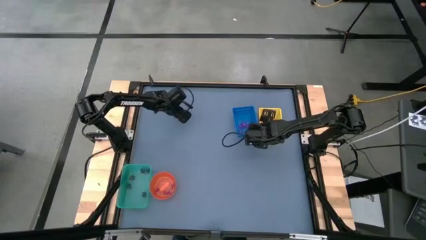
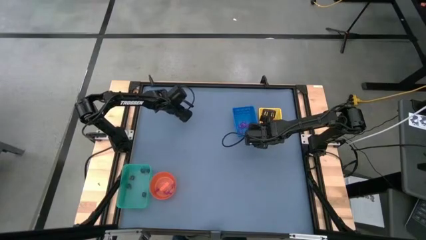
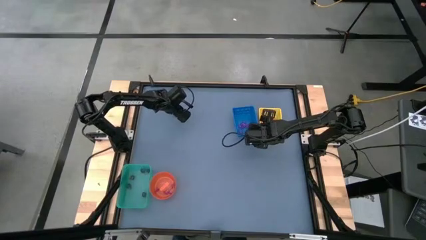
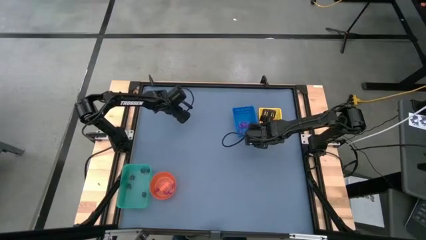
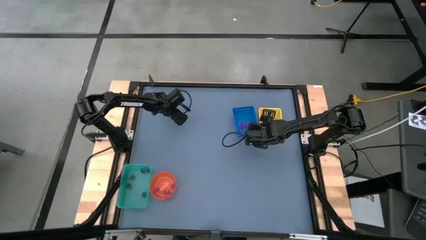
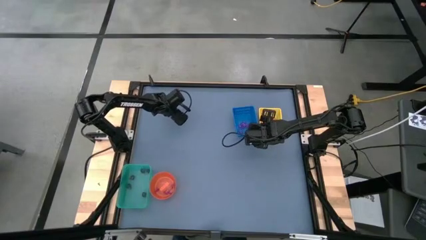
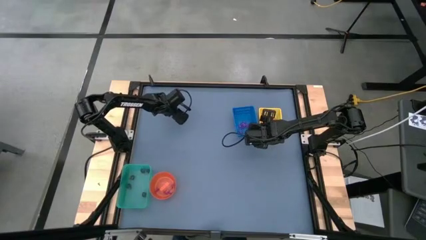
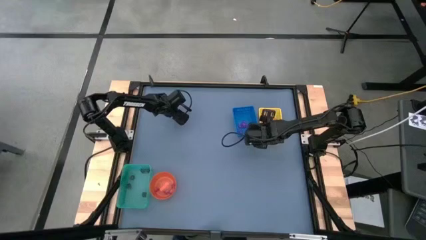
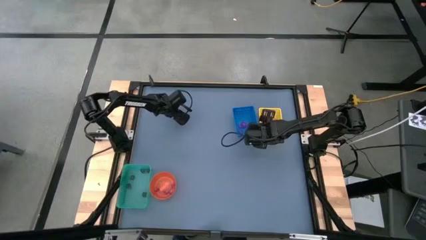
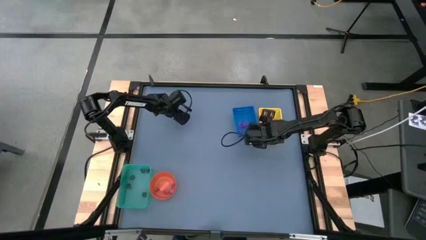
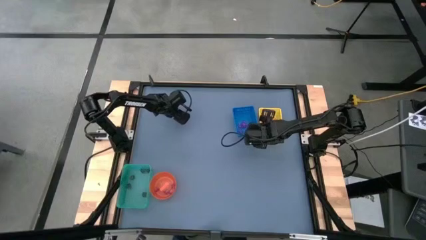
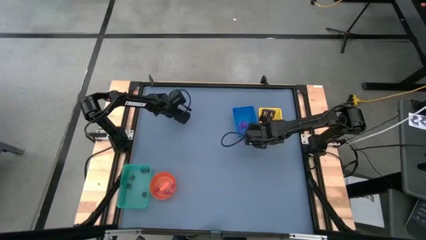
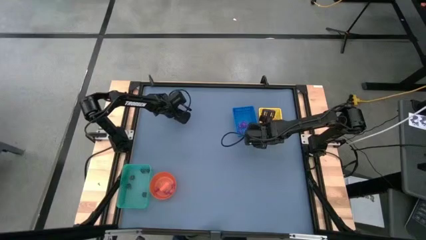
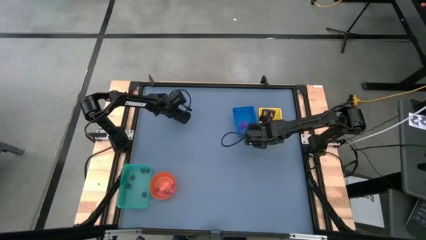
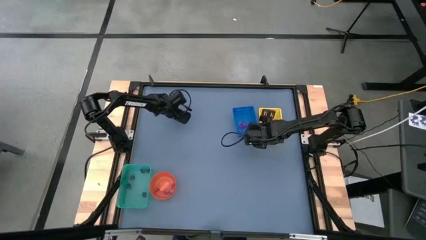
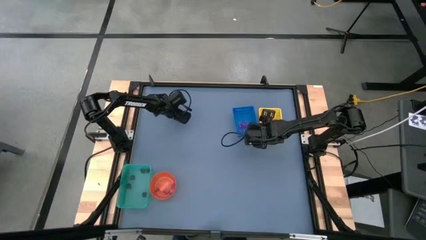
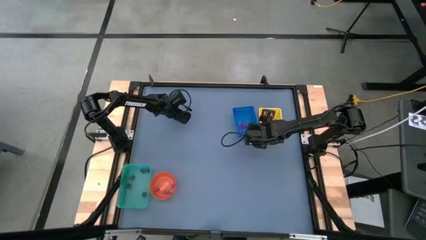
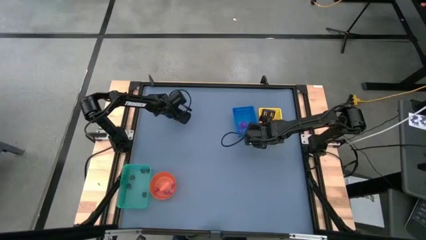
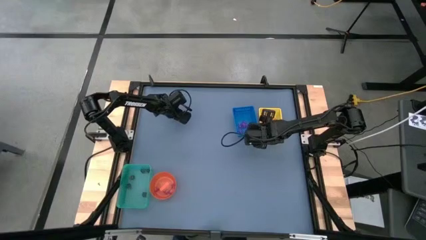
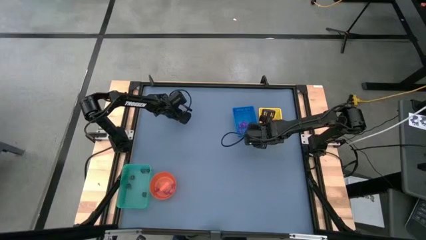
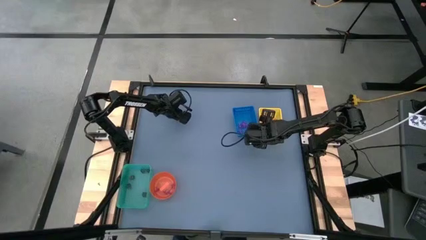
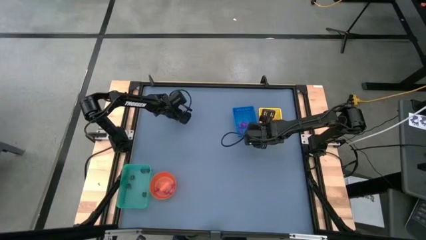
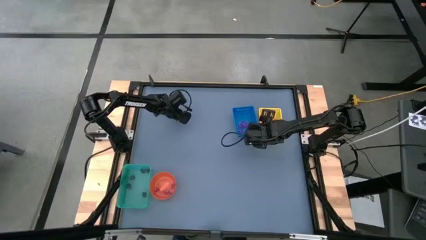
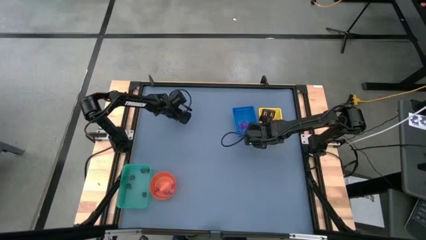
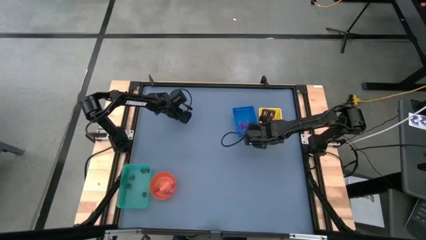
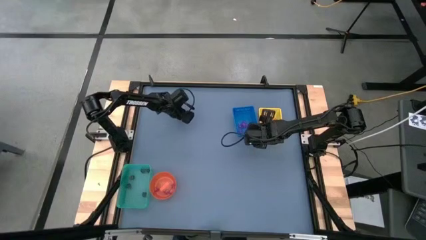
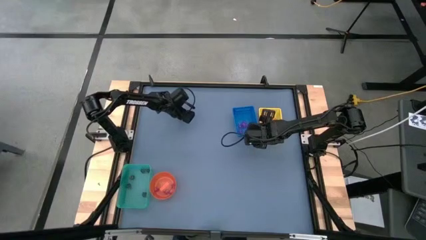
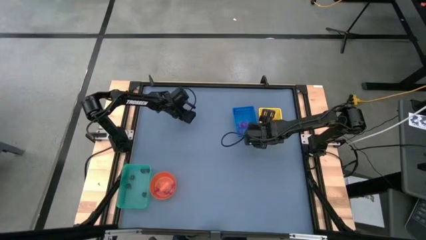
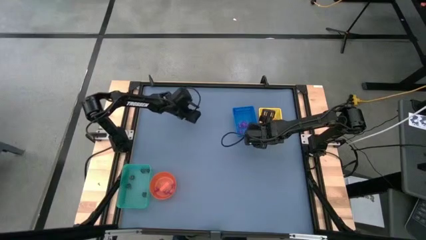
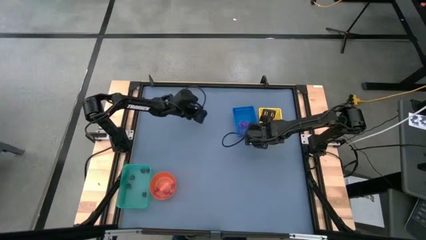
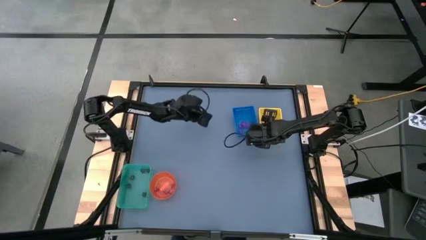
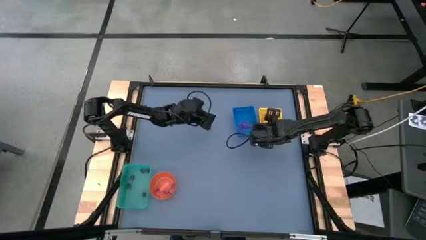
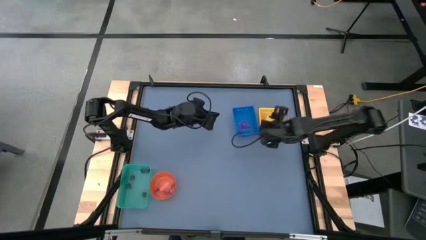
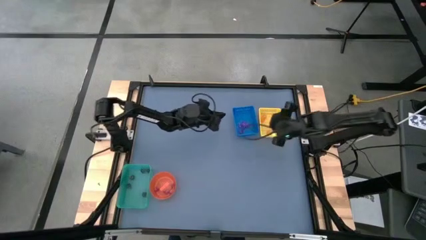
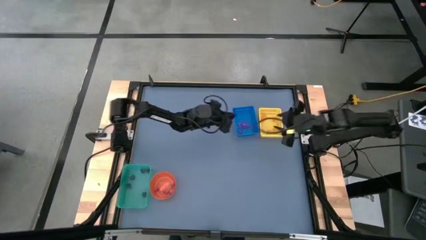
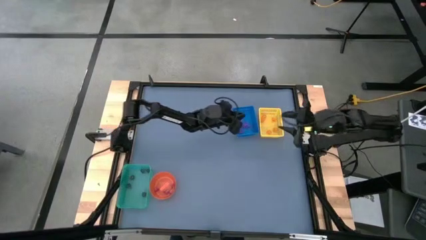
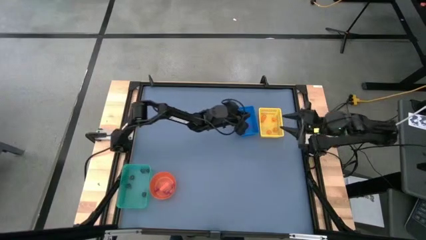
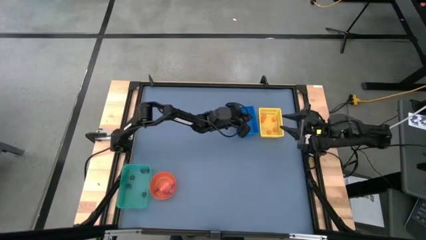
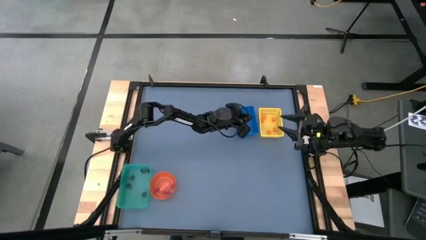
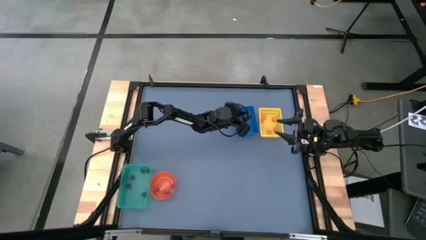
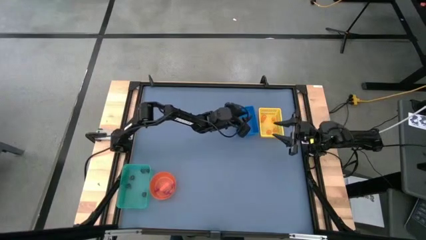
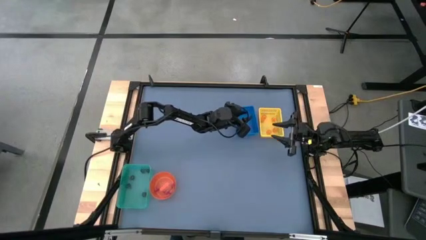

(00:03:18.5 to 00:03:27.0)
Task: Sort Halloween decoration
Put the violet spider toy into the blue box

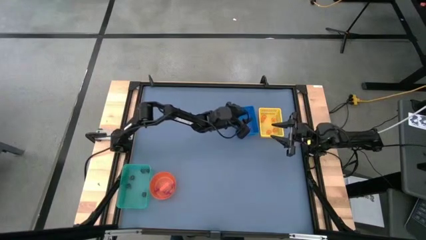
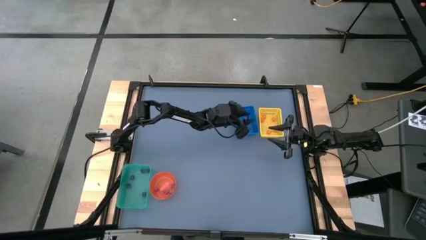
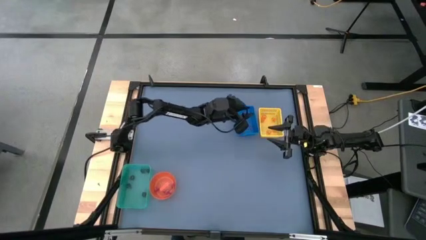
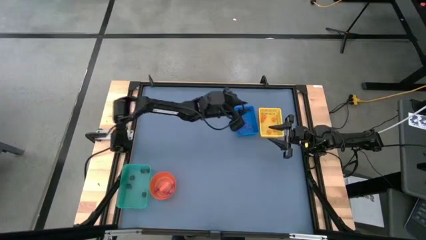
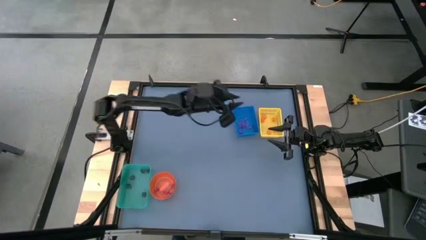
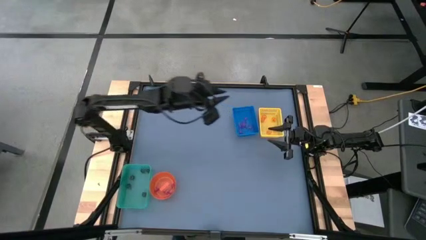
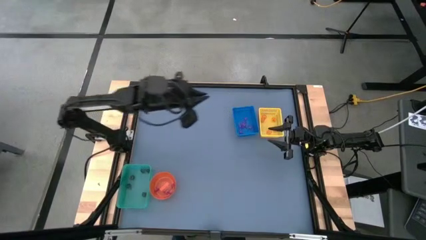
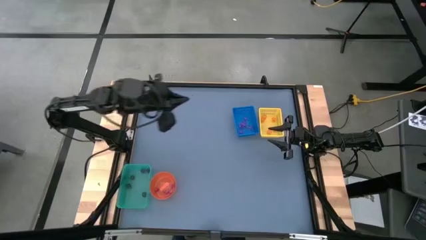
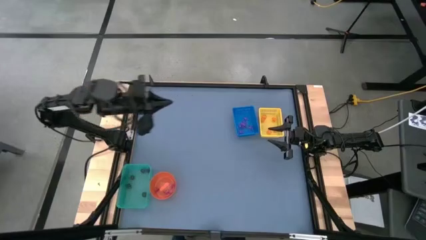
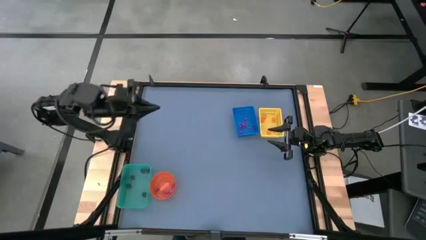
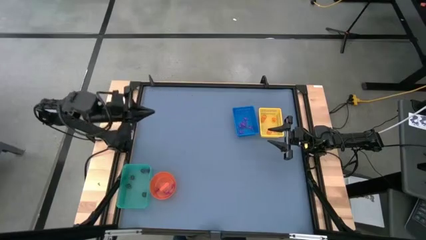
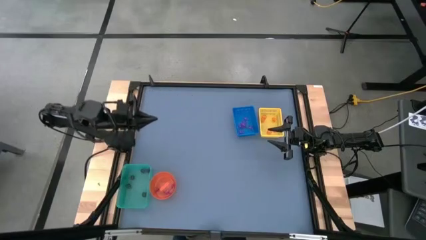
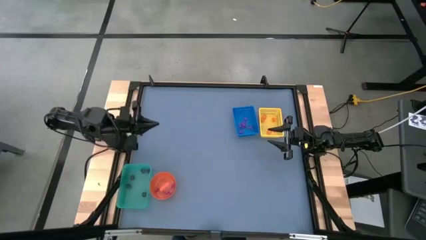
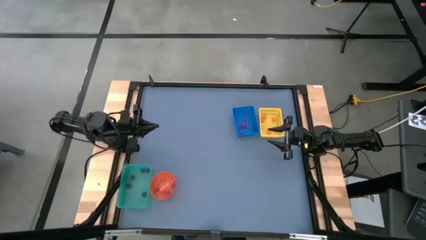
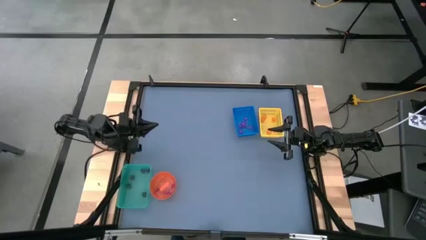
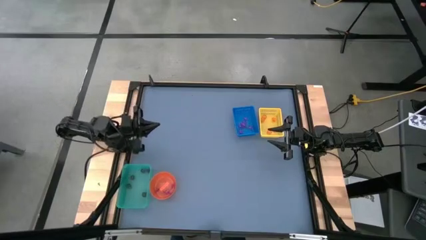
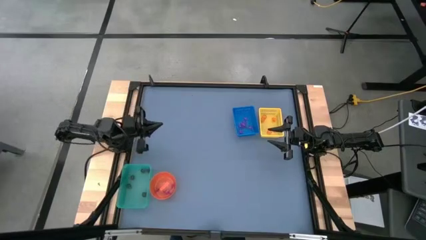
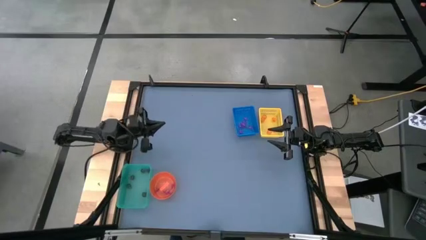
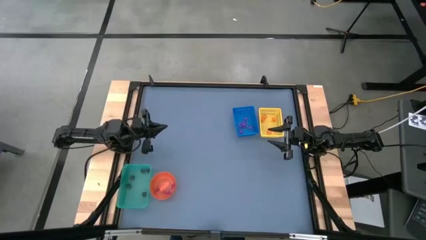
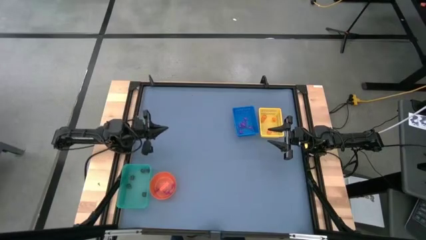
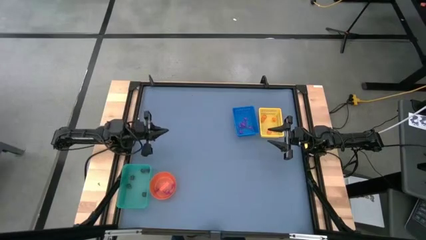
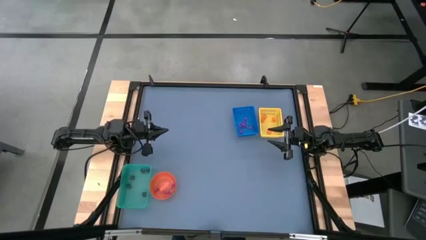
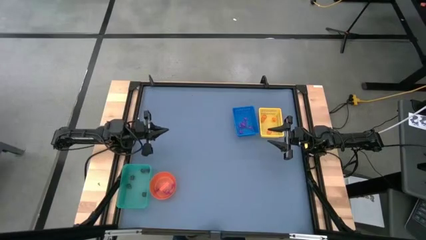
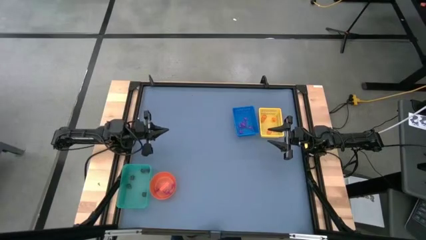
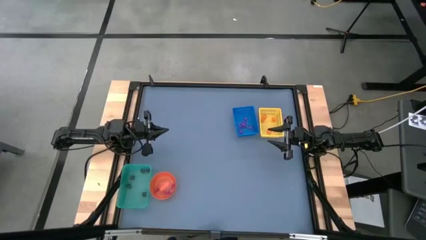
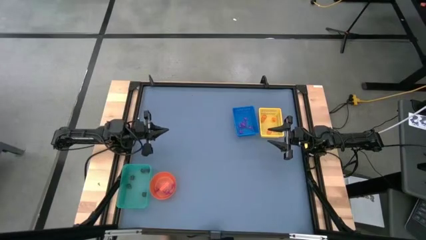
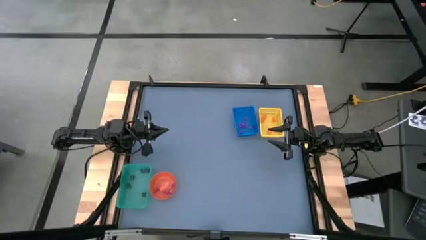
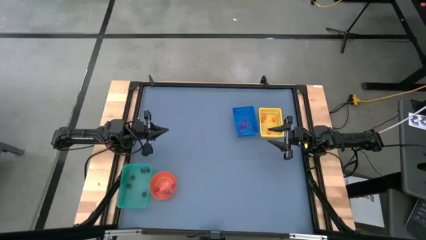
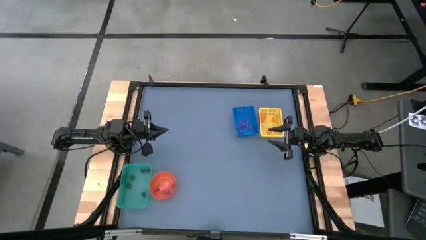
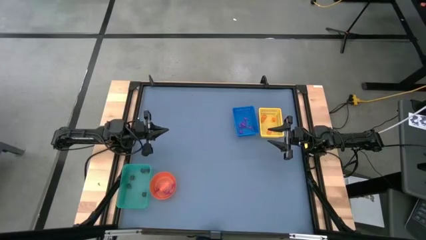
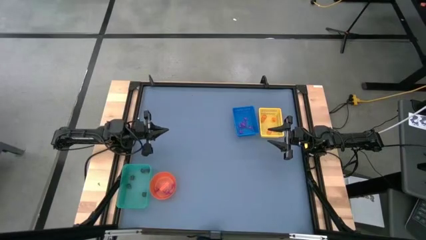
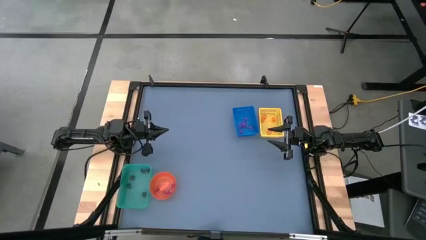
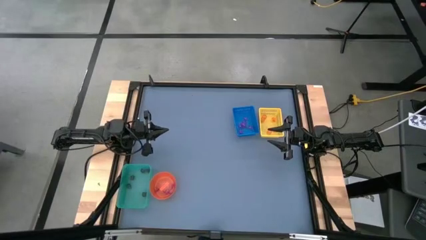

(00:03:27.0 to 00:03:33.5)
Return to Home Position
